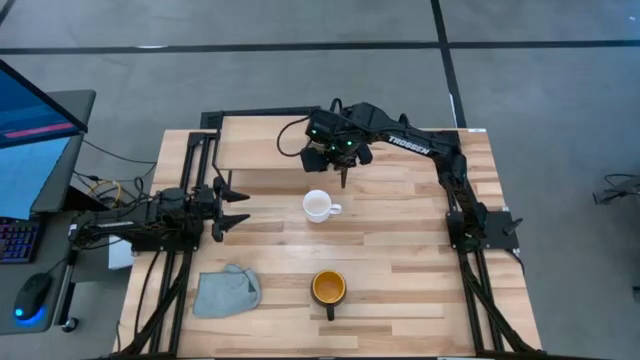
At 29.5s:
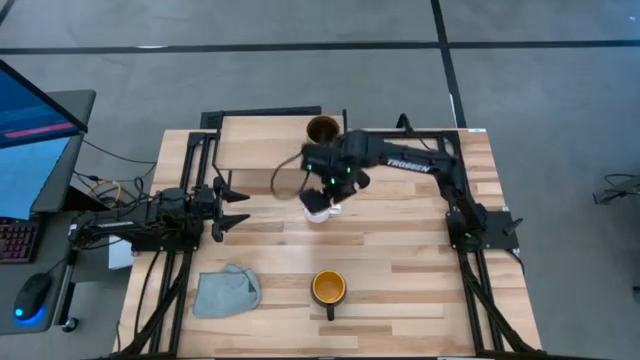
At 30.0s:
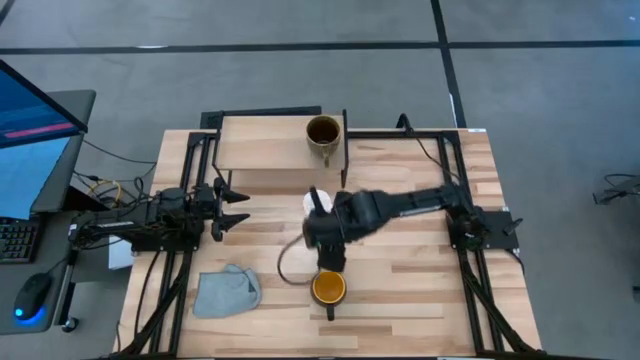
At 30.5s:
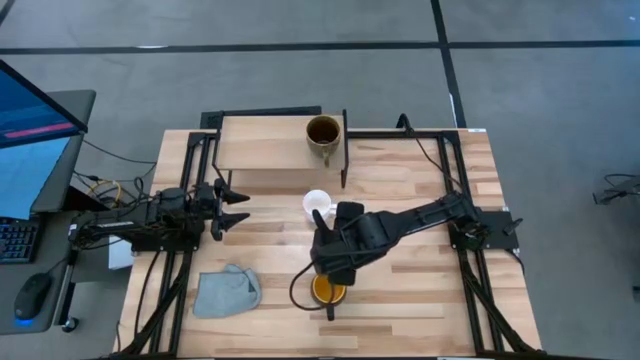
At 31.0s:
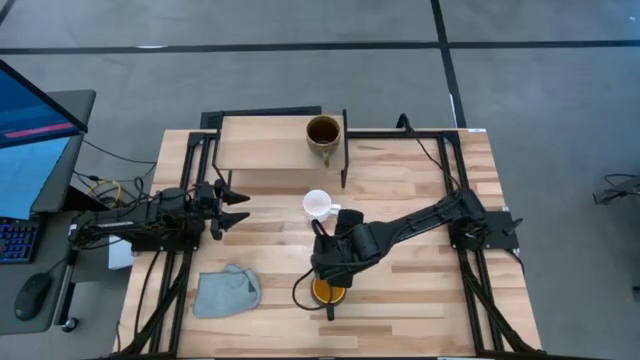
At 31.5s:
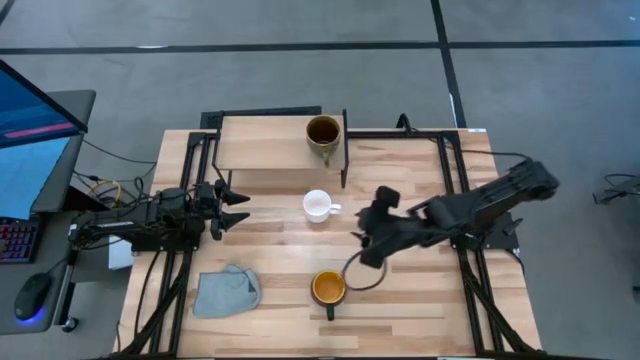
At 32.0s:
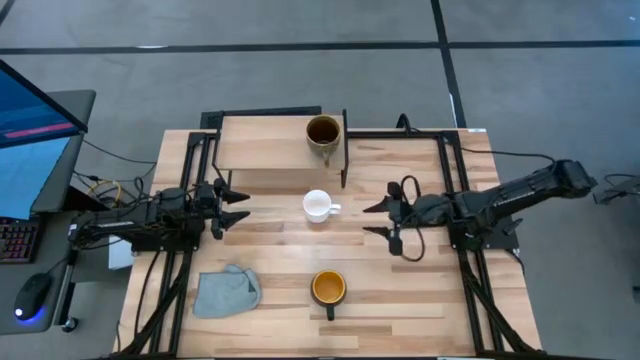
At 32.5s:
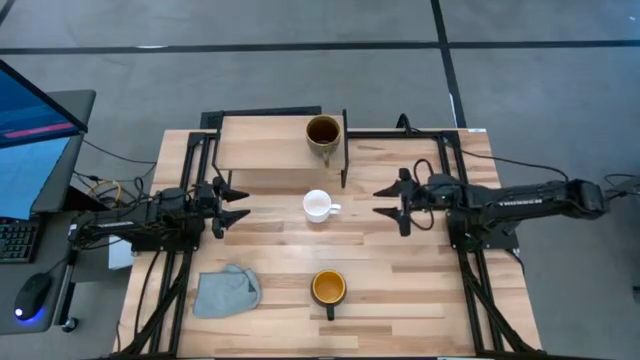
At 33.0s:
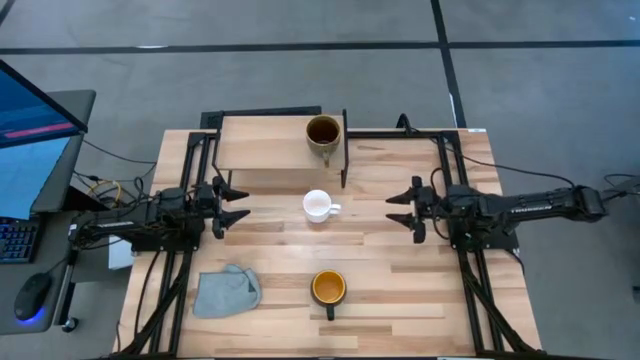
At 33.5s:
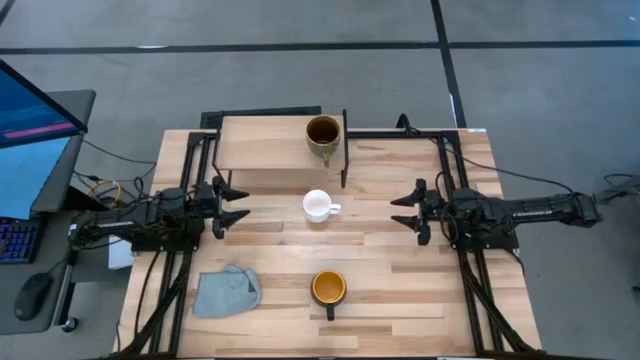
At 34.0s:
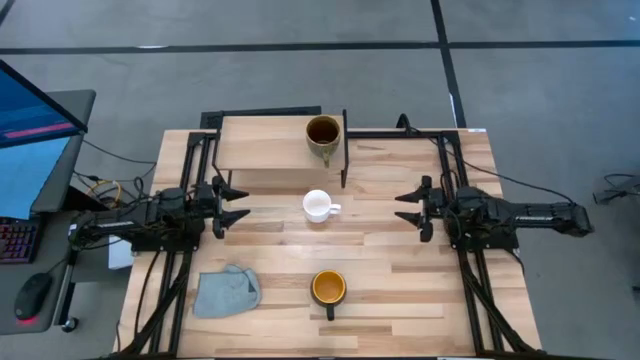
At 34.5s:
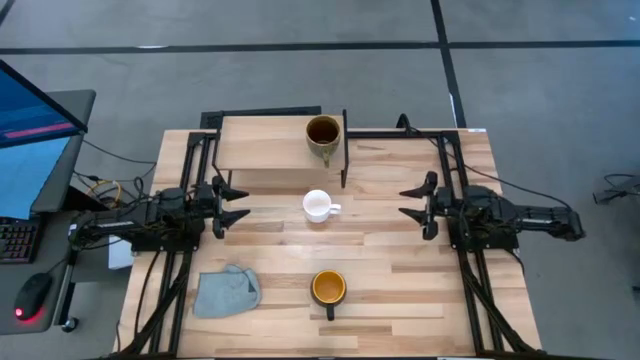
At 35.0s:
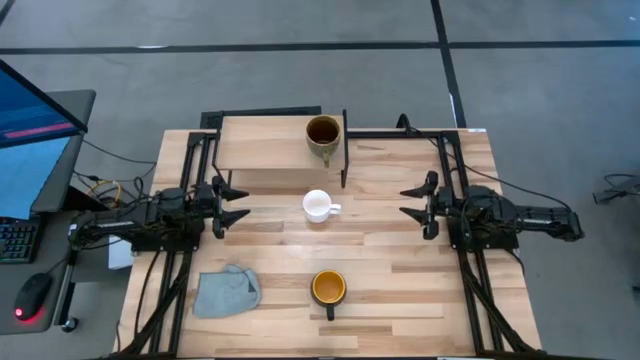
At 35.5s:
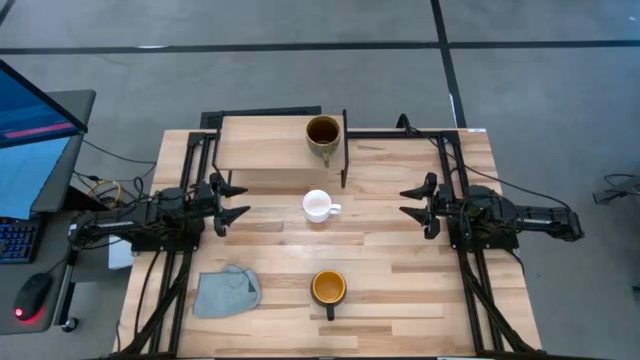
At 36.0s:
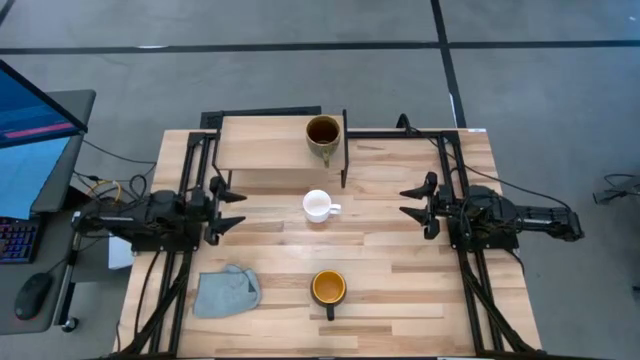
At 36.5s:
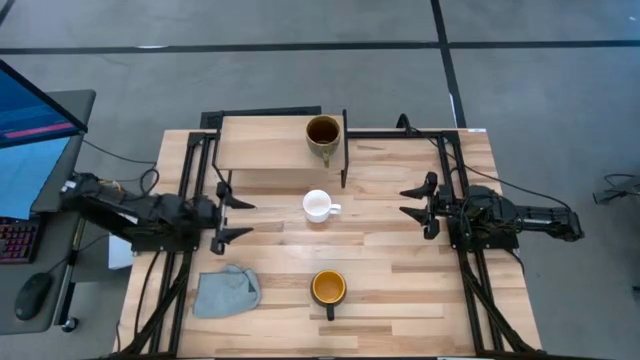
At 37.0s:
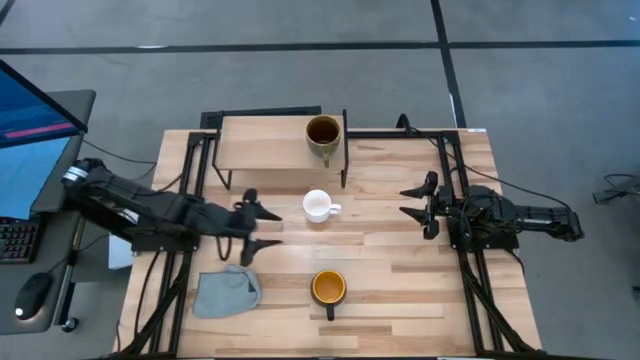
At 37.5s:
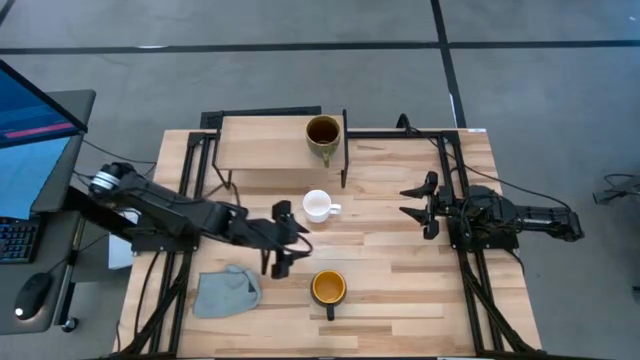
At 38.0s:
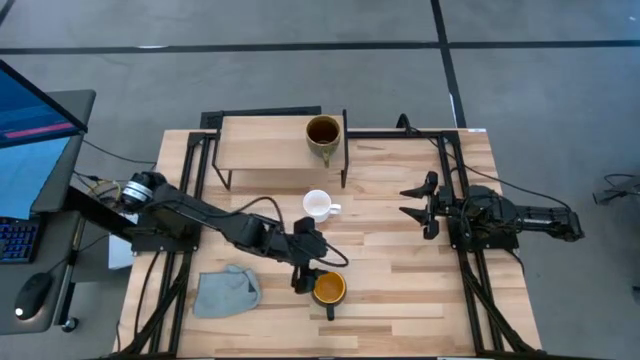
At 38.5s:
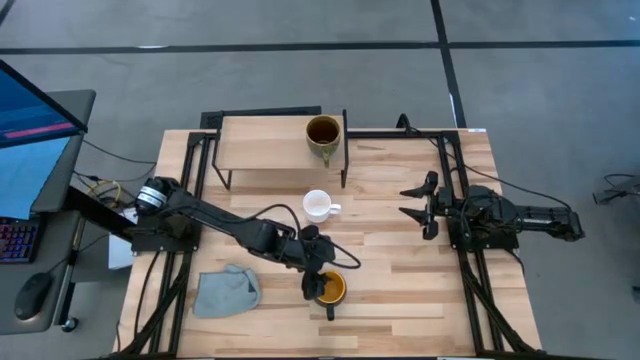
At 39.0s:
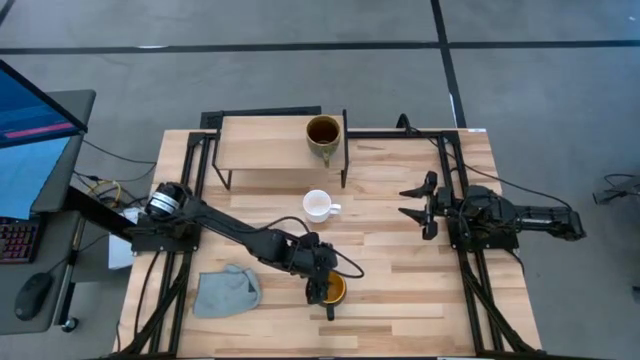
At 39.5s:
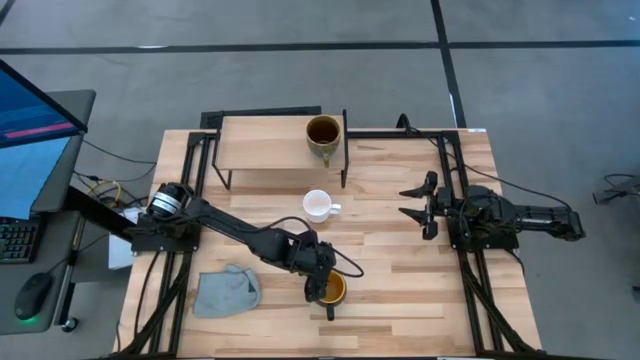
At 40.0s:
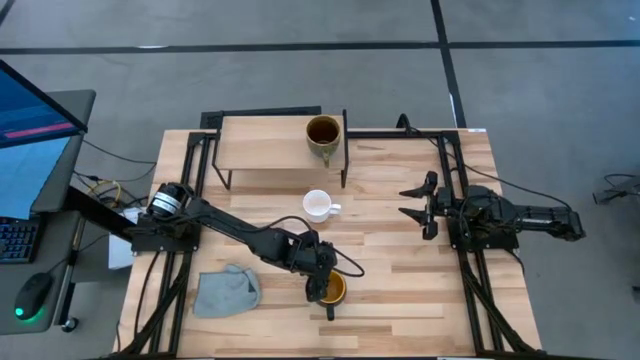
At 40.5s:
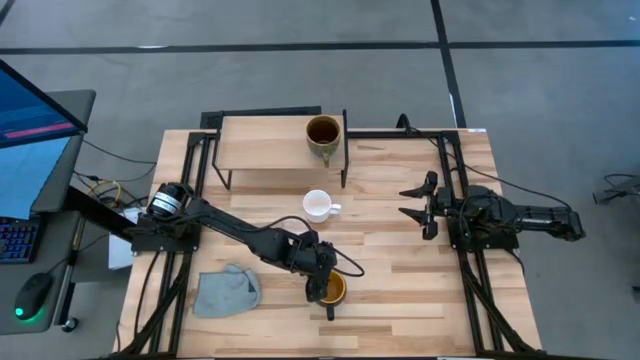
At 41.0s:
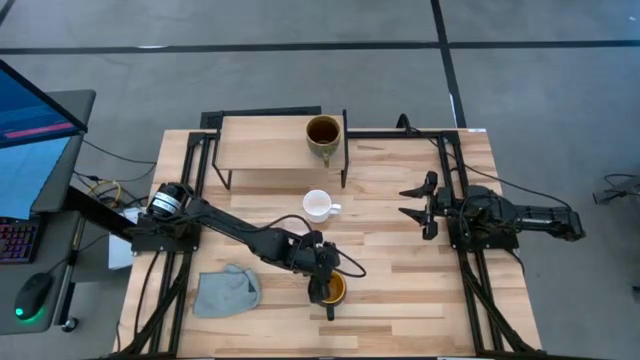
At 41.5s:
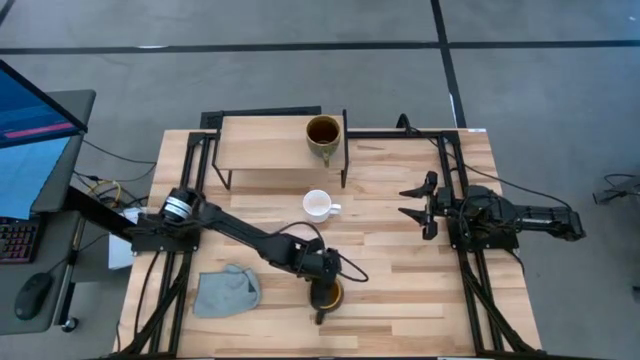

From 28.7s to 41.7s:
Task: Stack small to large cups/mugs on shelf
Put the black yellow mug on the shelf

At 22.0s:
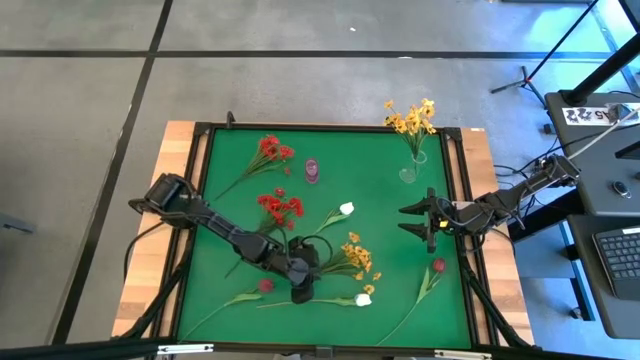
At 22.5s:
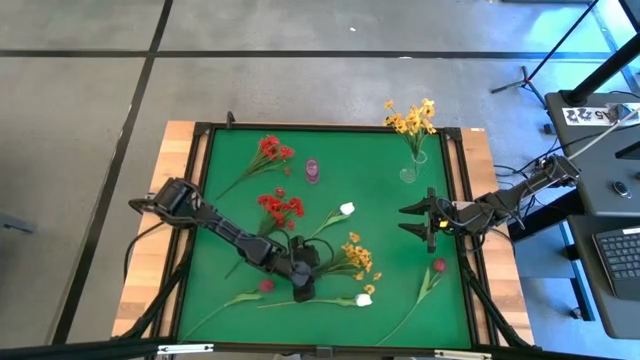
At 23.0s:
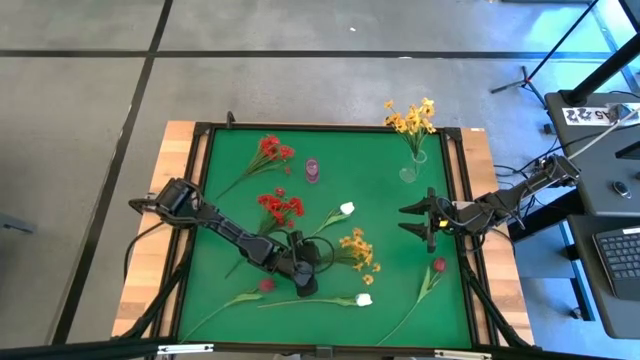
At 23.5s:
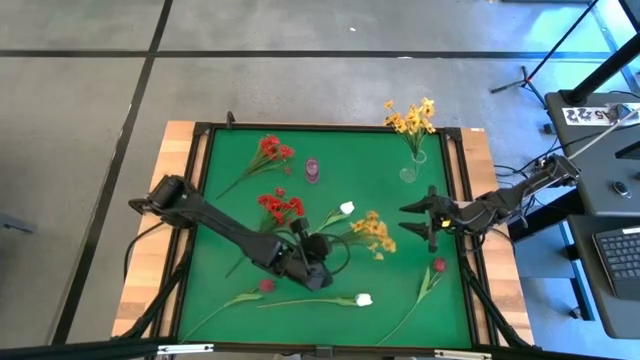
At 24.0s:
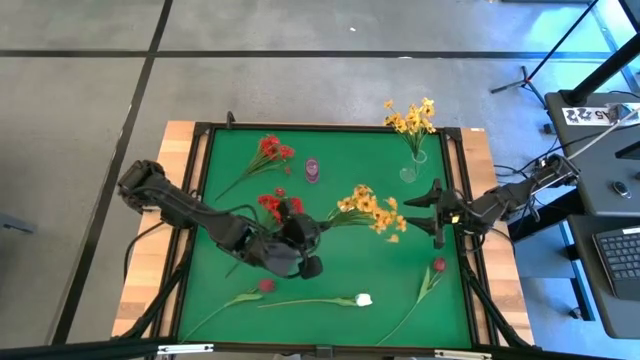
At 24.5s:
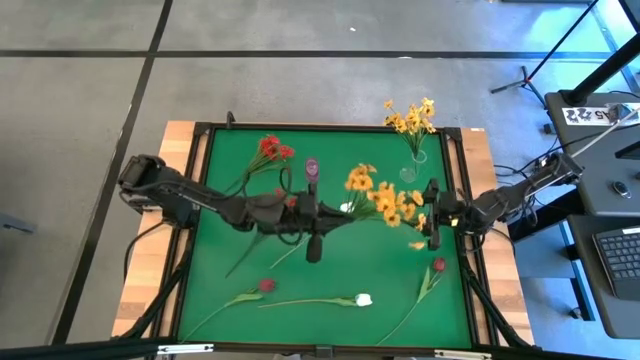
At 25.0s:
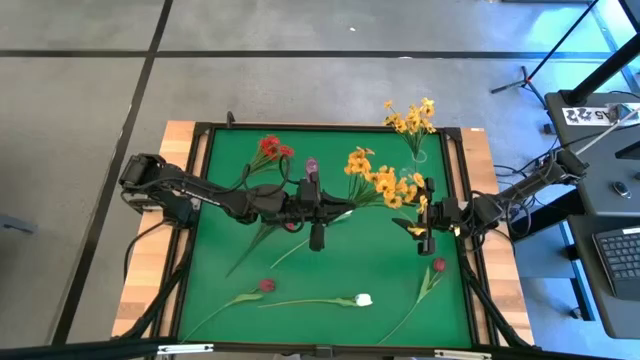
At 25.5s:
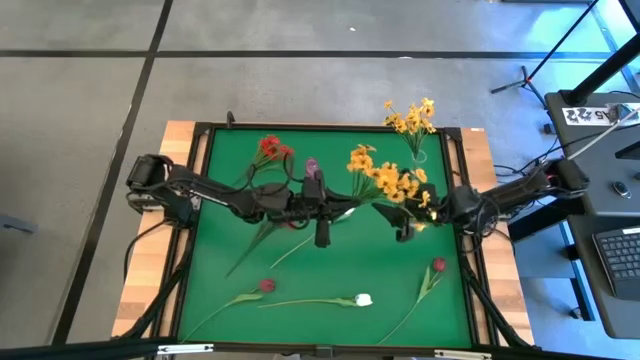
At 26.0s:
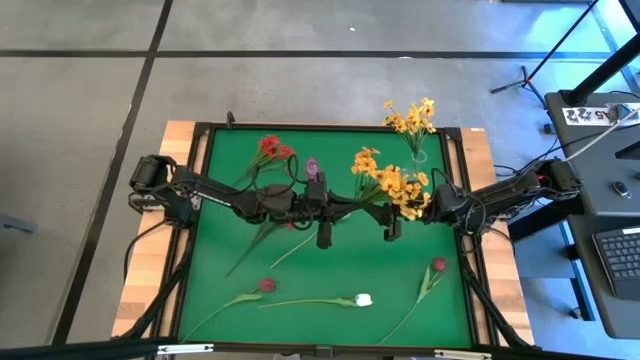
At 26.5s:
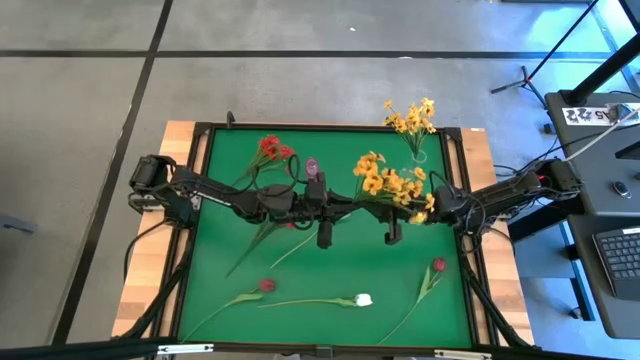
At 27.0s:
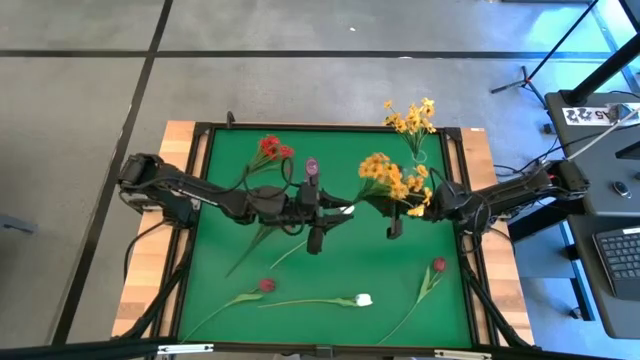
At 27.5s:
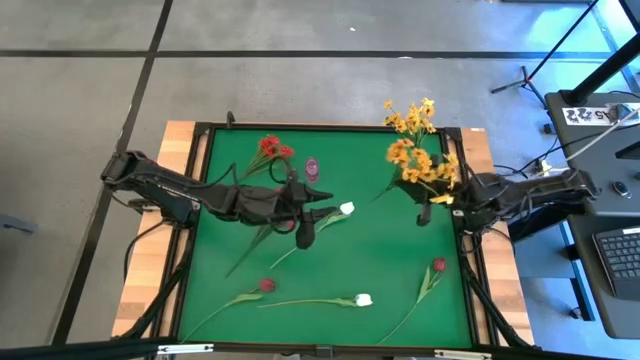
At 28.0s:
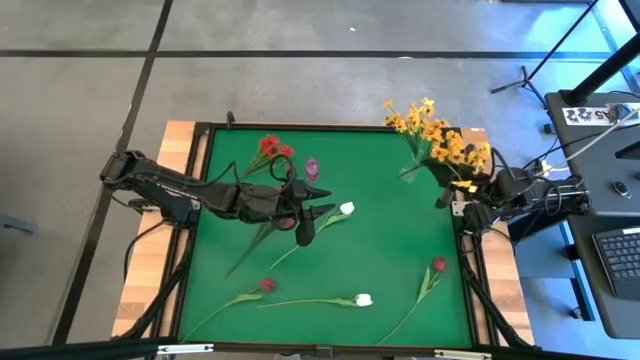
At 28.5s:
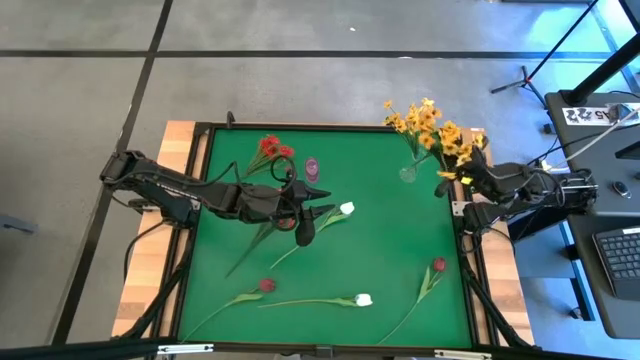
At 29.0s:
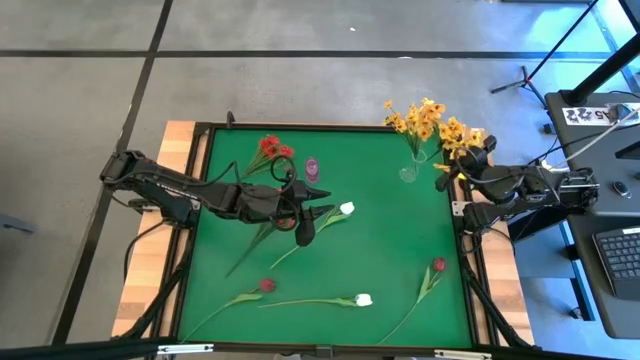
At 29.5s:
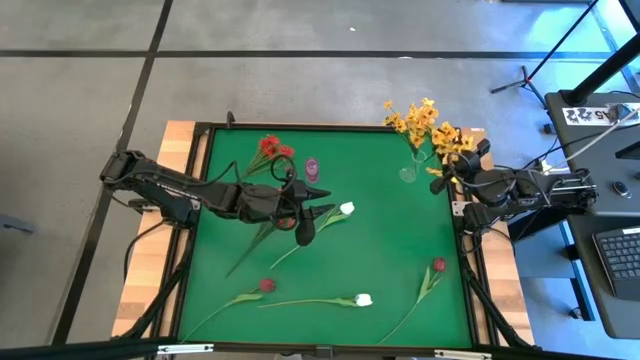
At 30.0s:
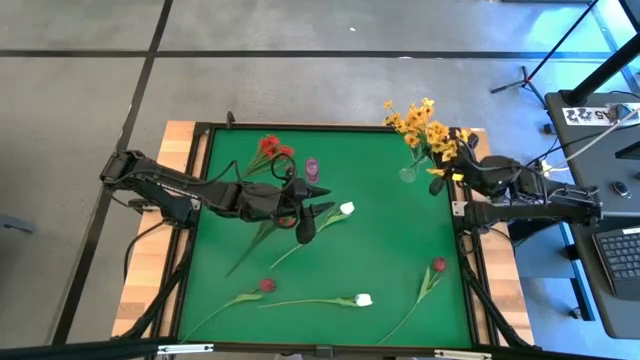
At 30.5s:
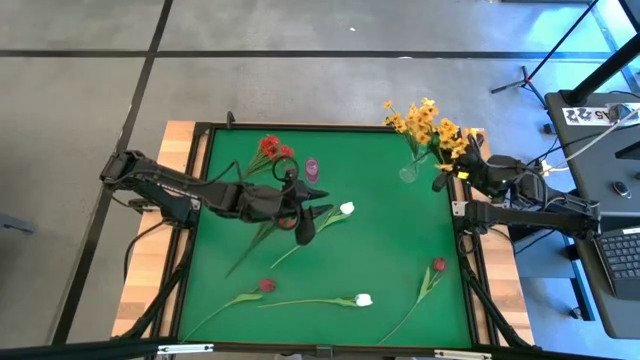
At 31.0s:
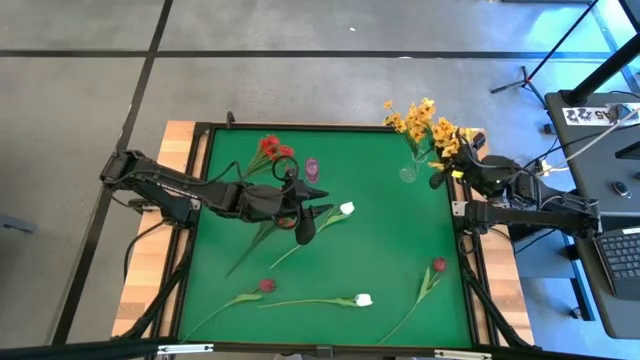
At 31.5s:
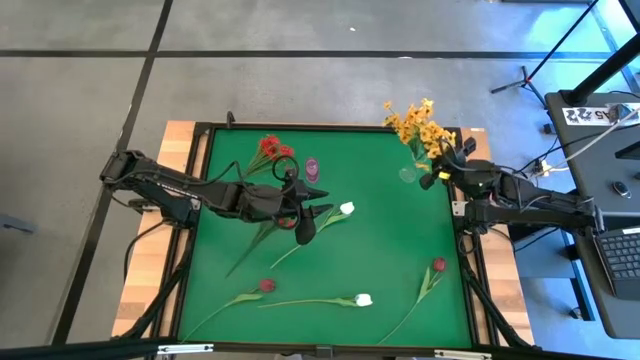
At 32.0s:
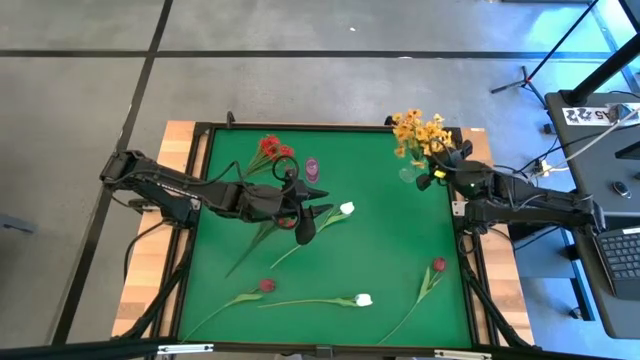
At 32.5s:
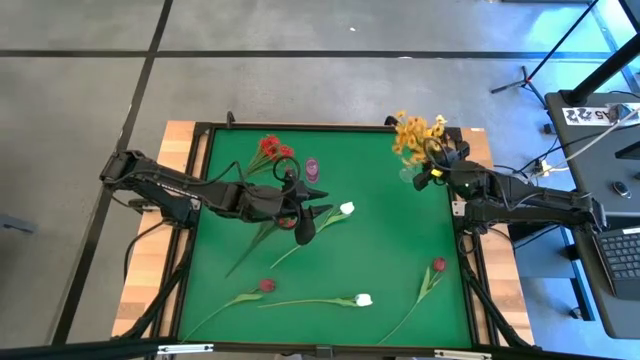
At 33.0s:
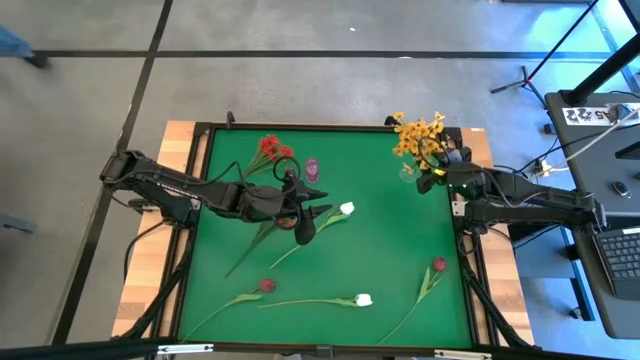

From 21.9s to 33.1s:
Task: Sort flowers into vase by color
Put the yellow flowers into the transparent vase
